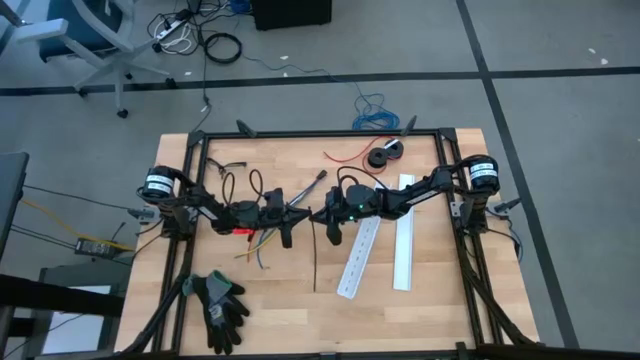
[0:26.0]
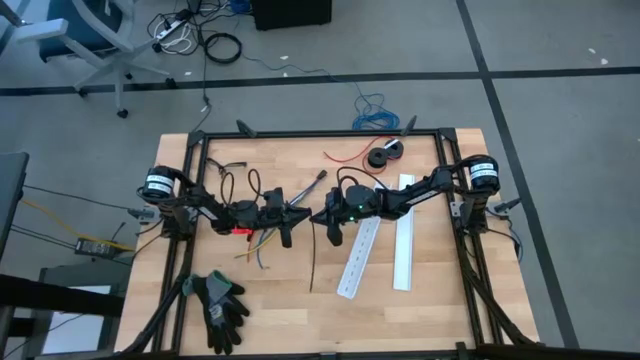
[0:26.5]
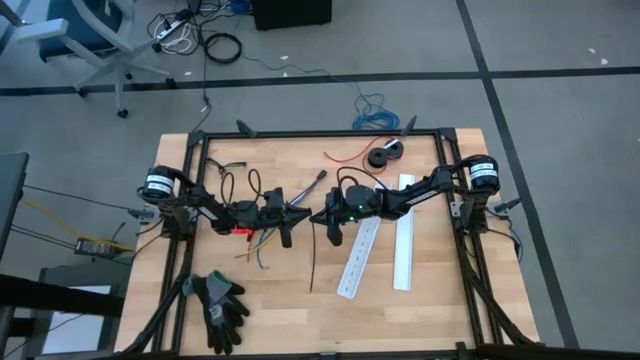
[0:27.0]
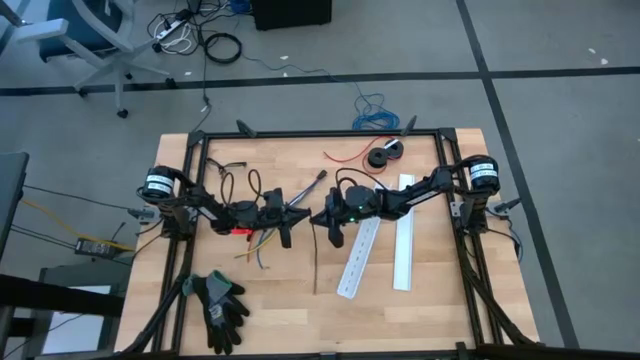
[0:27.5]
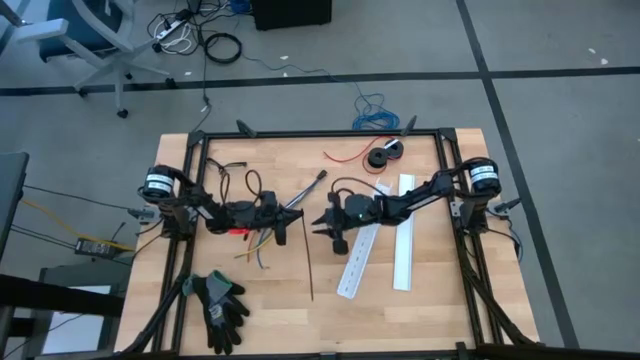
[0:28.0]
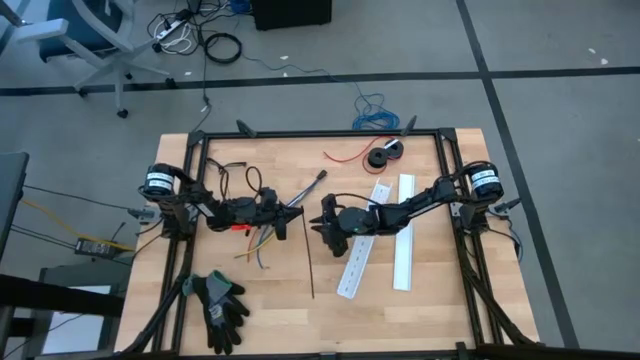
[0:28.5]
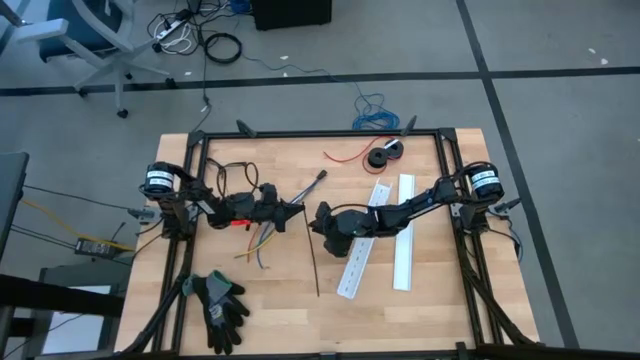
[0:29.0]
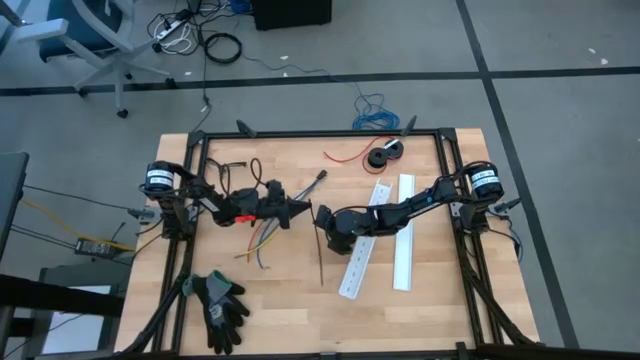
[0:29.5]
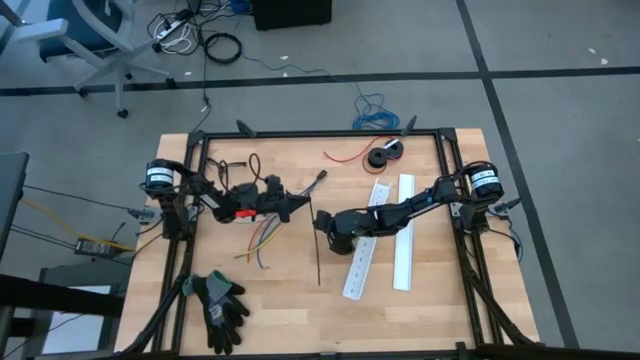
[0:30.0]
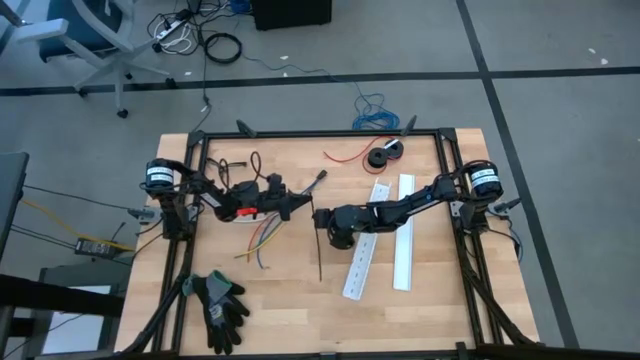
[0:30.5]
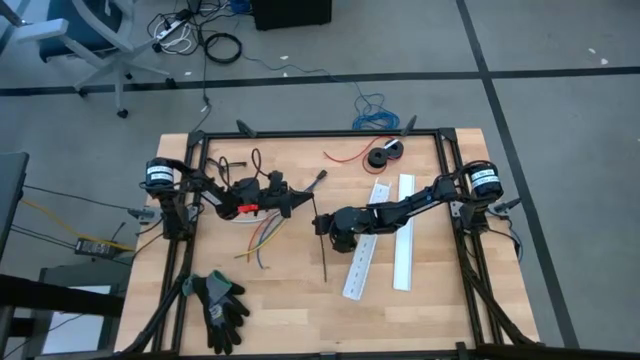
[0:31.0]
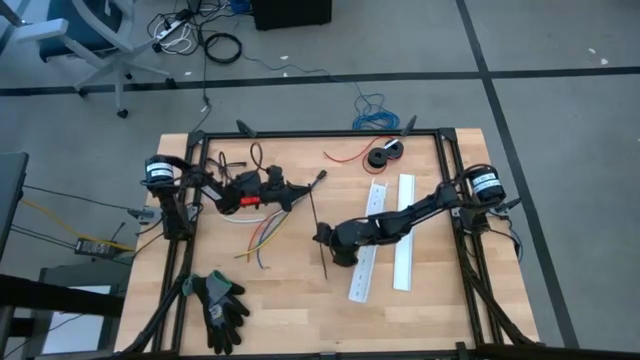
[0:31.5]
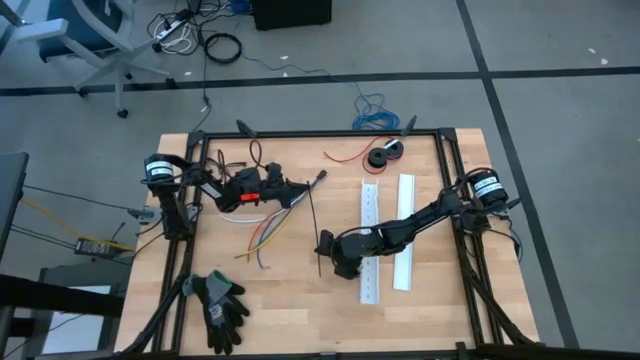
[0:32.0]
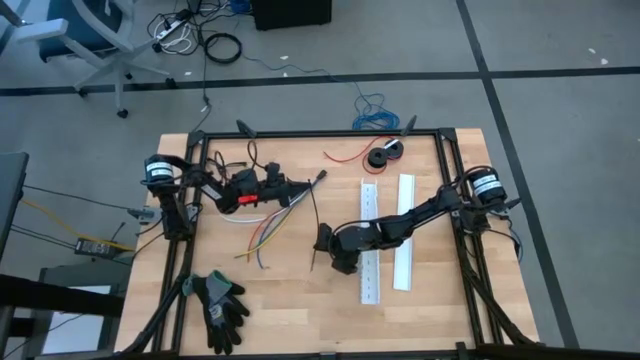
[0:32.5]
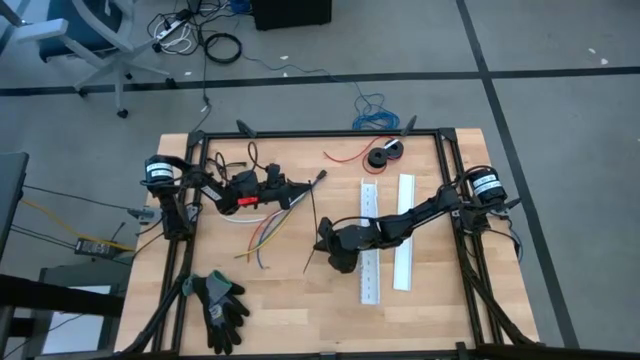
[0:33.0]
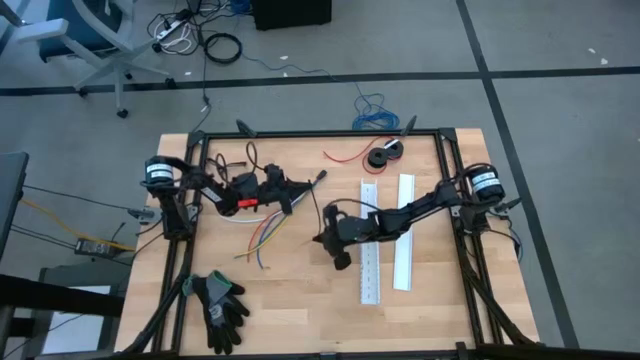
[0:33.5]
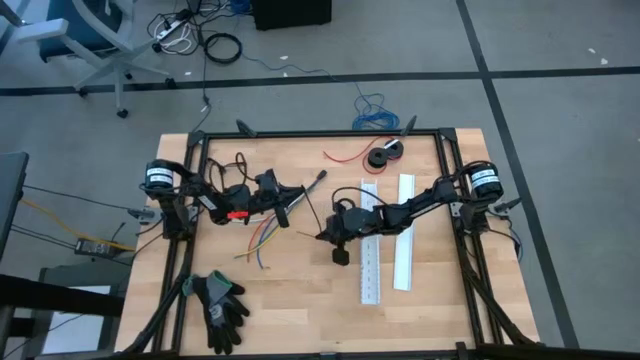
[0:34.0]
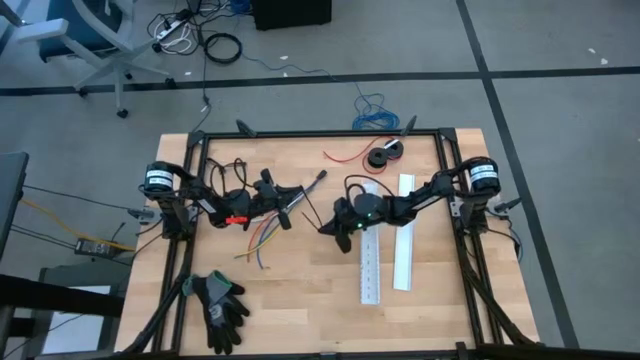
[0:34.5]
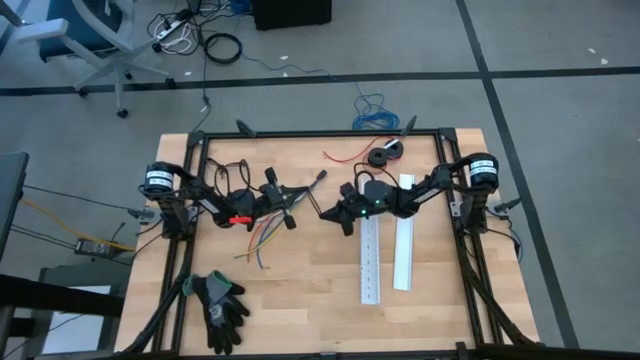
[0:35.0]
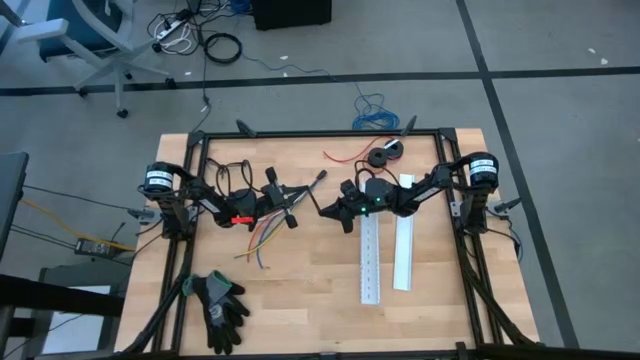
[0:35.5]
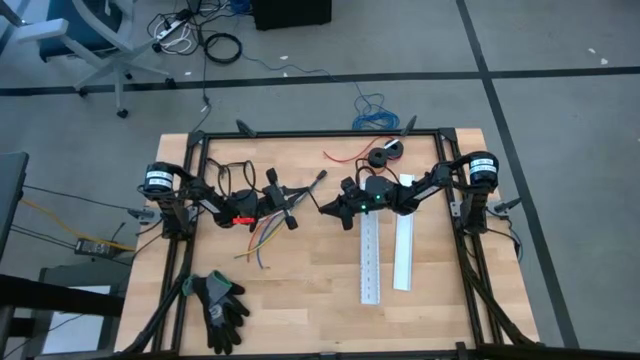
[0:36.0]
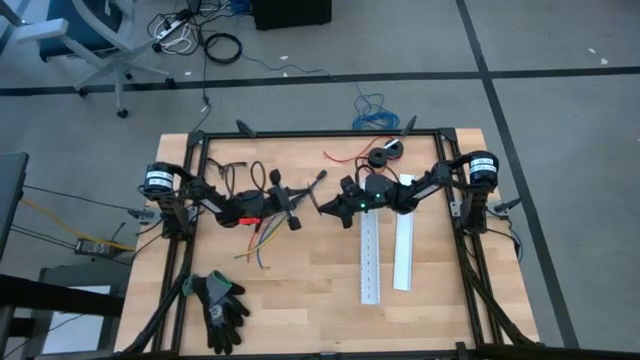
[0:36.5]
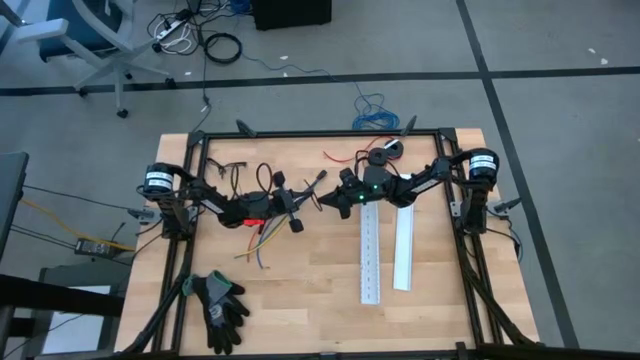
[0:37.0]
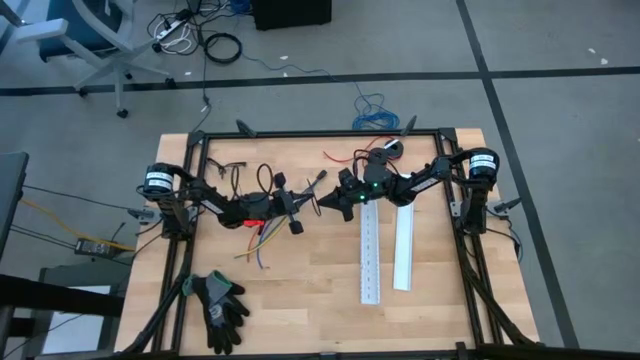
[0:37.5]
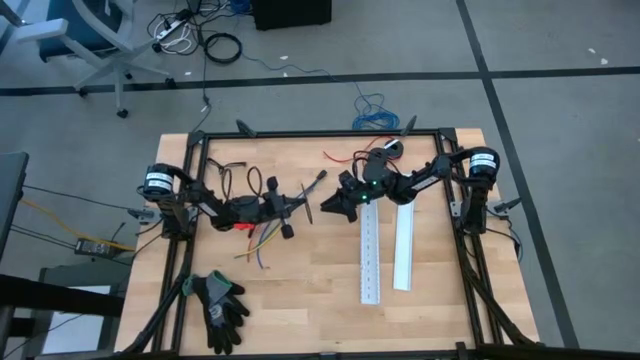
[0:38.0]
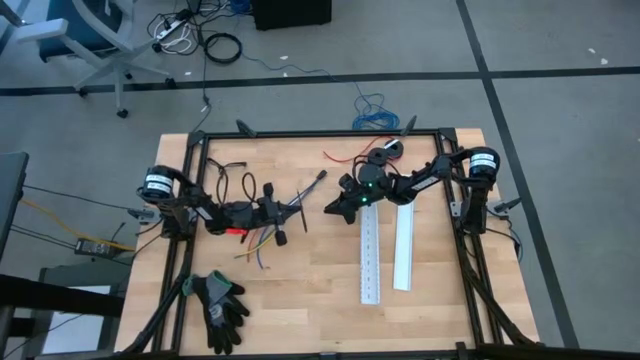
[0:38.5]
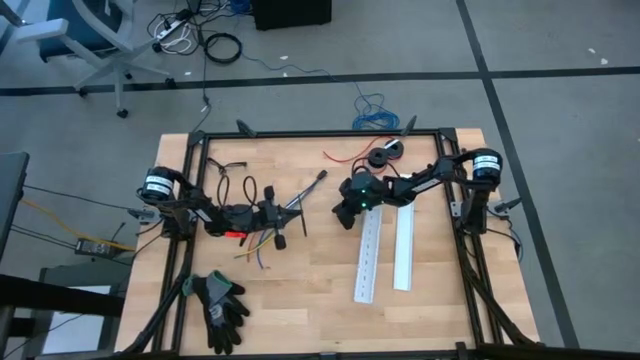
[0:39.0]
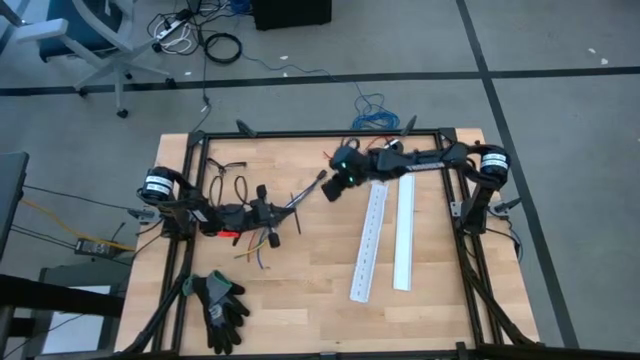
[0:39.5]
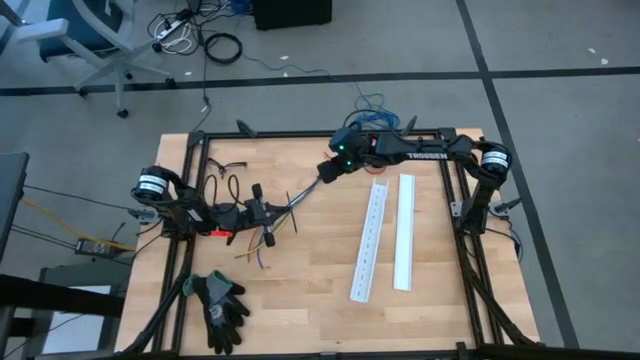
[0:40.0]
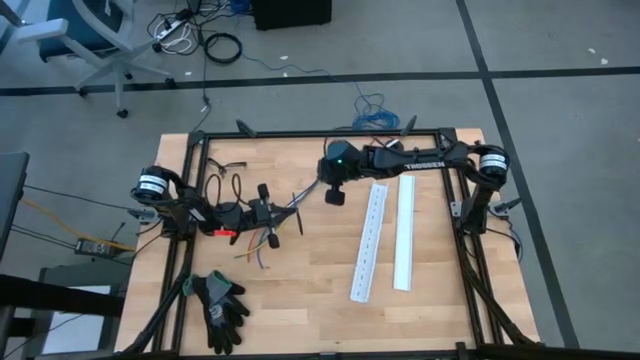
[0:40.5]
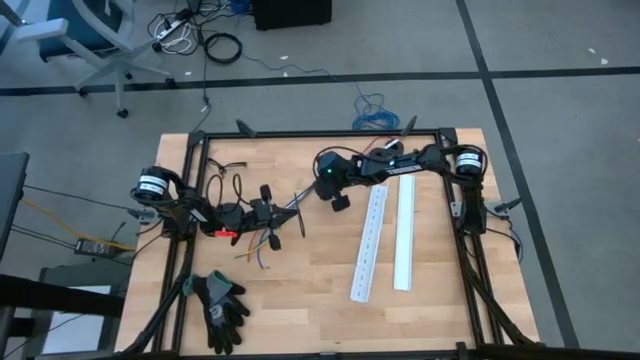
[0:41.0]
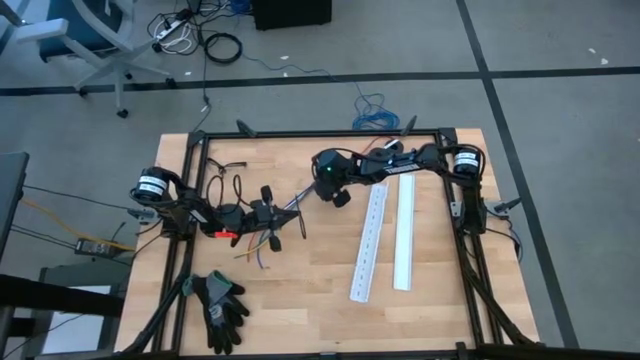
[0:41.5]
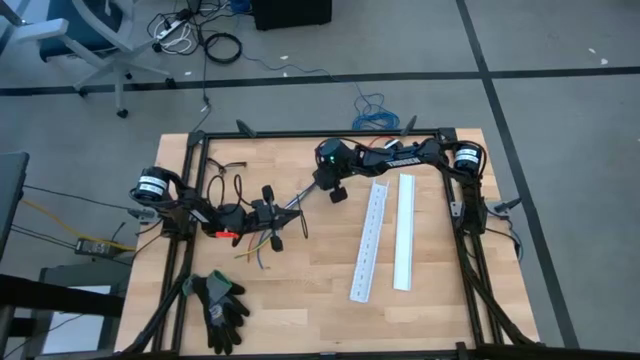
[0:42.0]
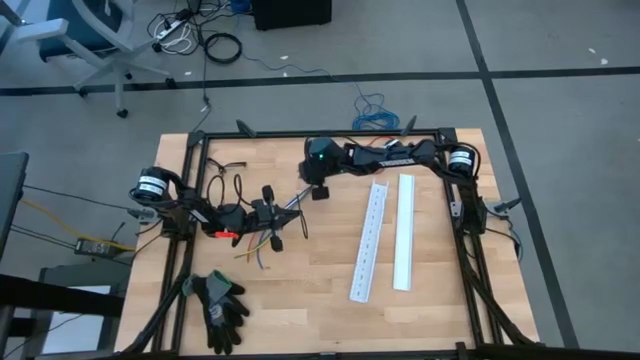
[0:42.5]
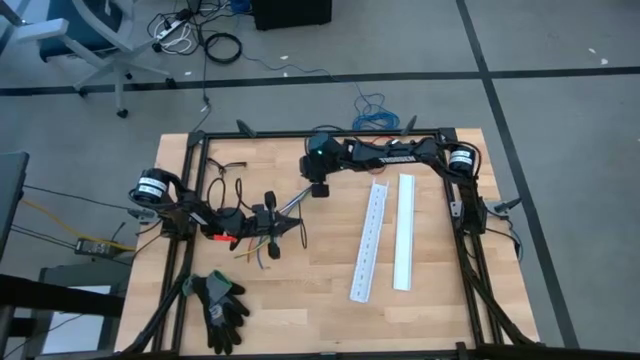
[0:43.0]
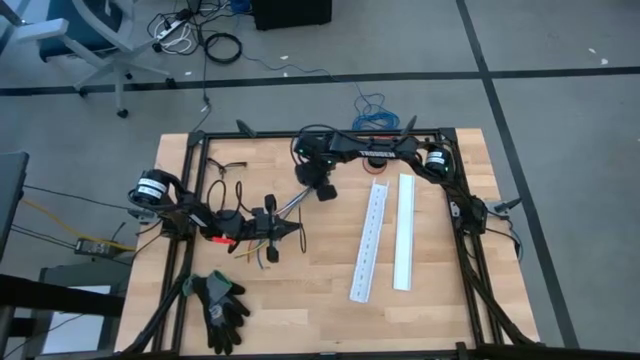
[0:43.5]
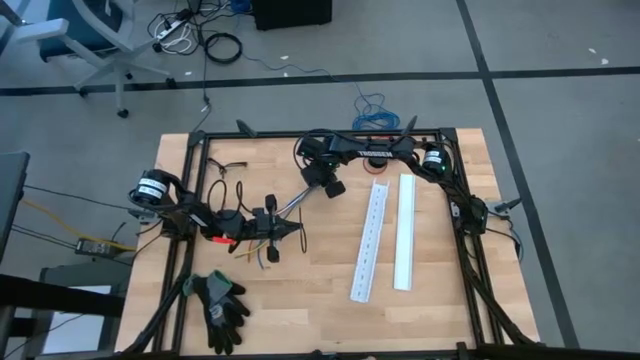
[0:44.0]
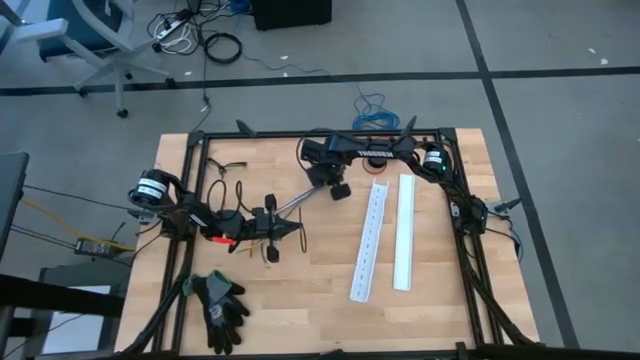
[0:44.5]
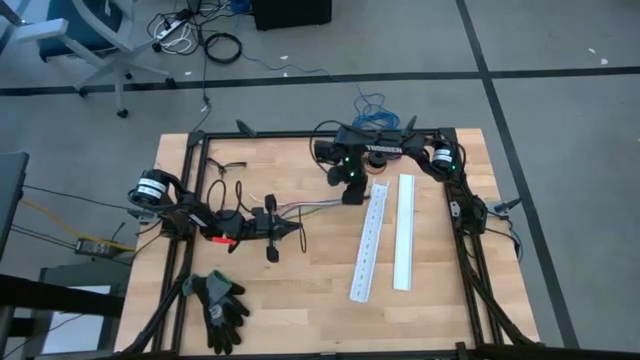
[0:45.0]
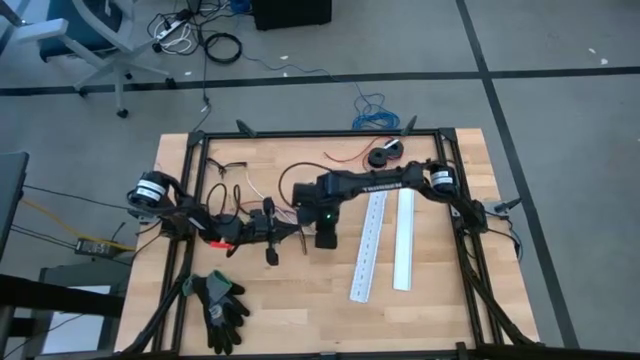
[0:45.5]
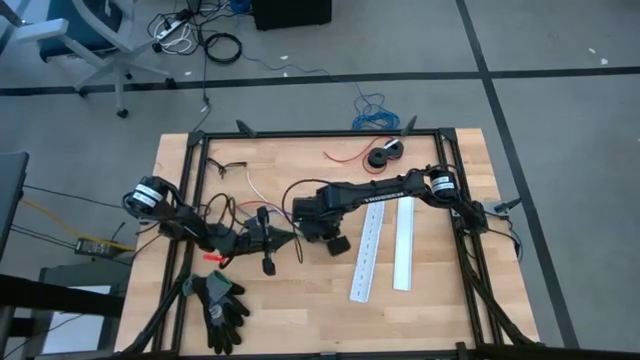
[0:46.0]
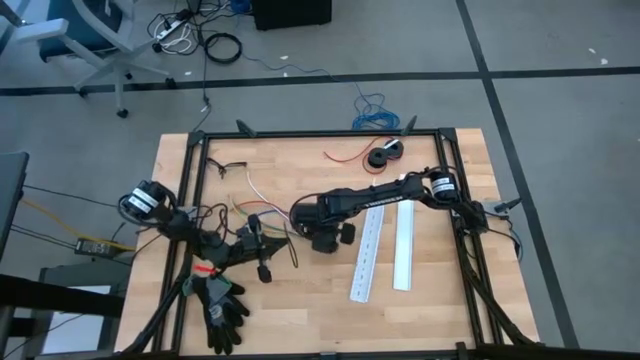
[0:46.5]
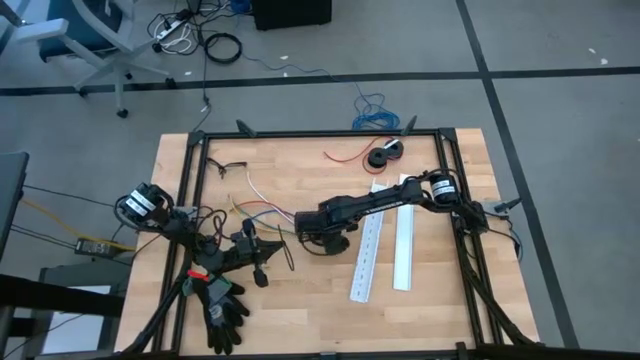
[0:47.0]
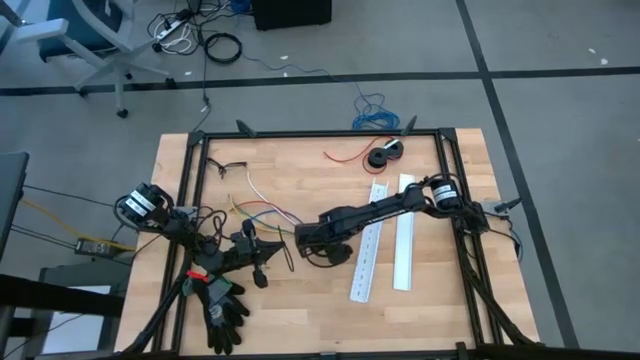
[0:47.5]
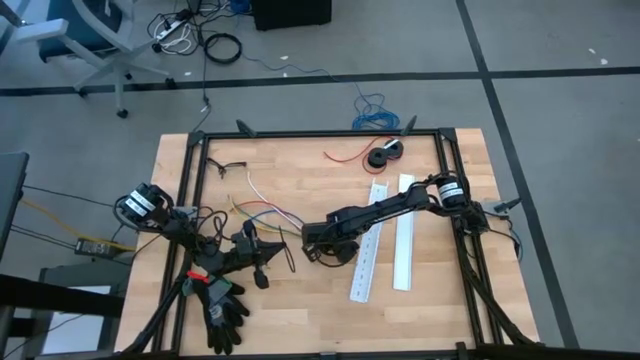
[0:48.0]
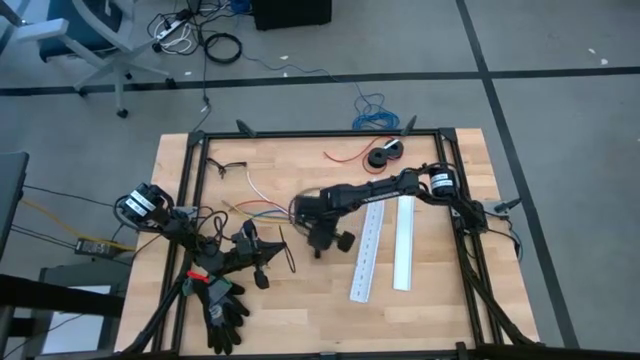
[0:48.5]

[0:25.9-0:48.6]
Task: Ziptie cables
Wrap the cable wires with the black zip tie
